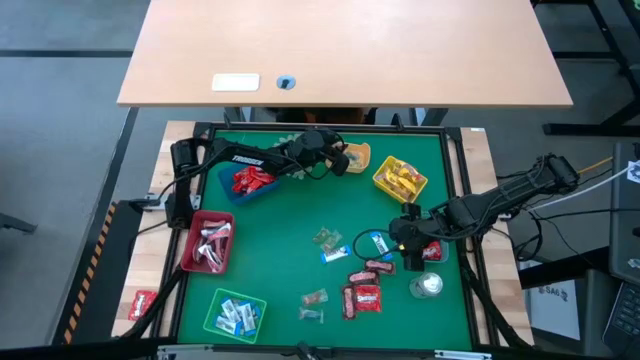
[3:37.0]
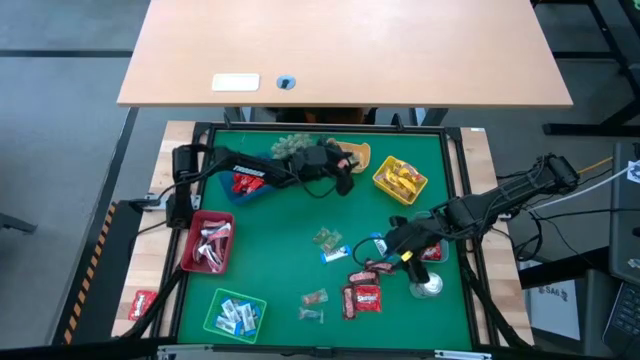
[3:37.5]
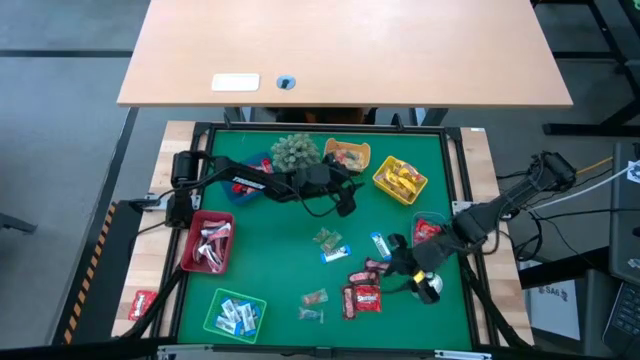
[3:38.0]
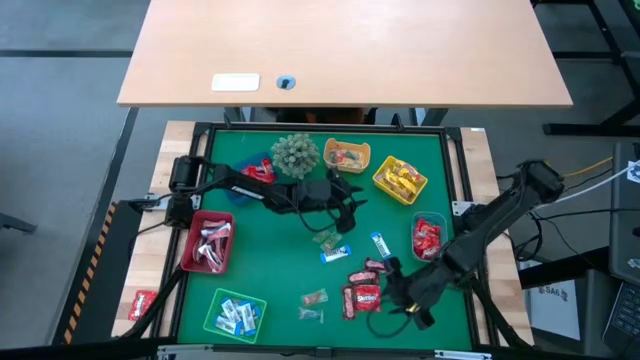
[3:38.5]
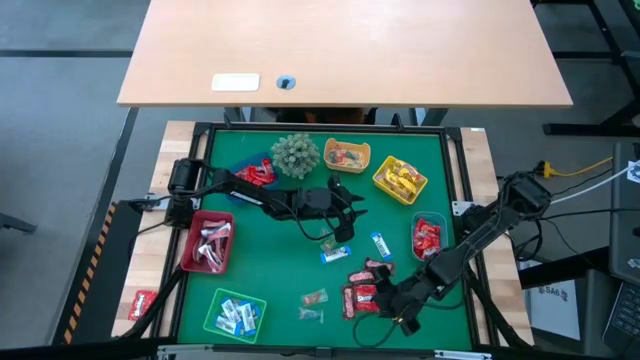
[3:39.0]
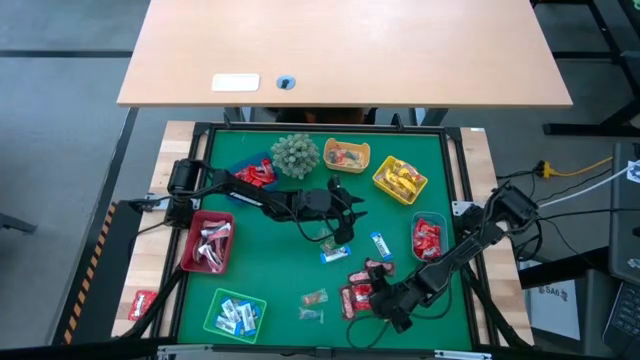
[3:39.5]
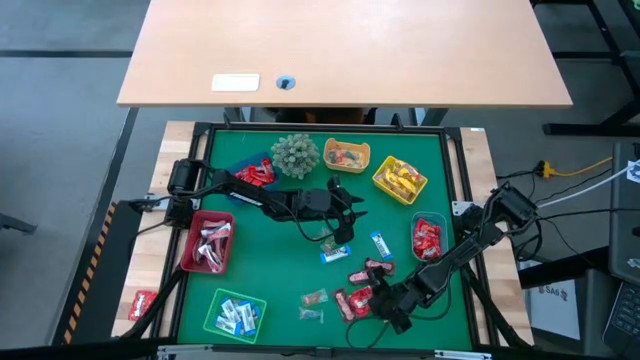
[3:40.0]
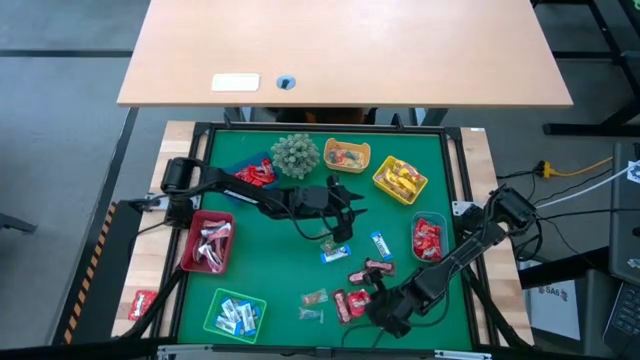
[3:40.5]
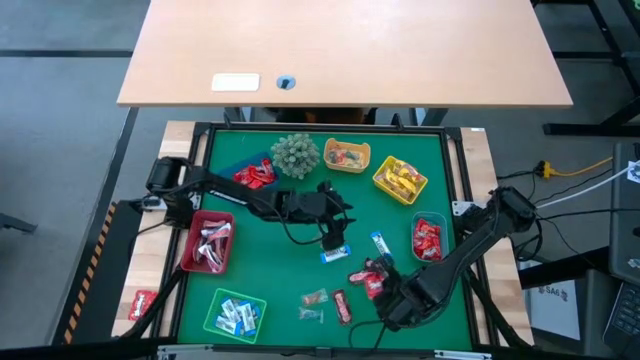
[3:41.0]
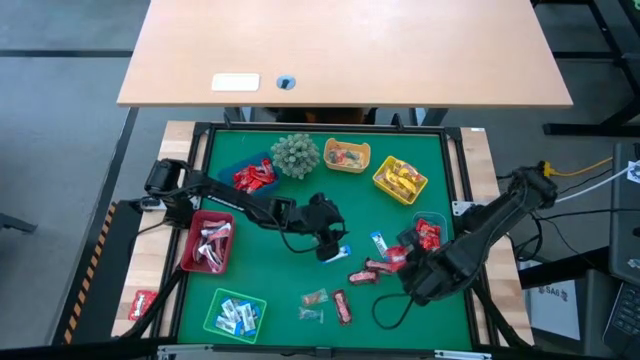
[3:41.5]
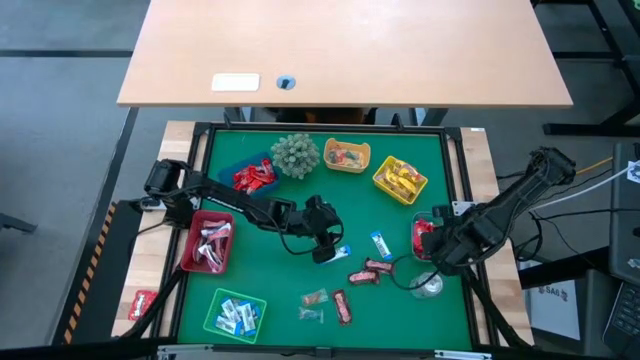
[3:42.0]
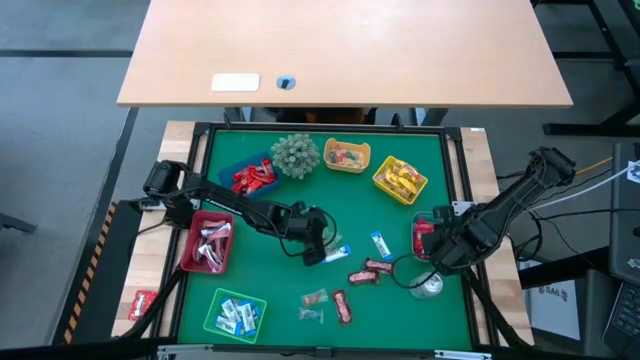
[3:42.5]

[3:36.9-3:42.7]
Task: Sort candy
Put the red candy into the gray bin

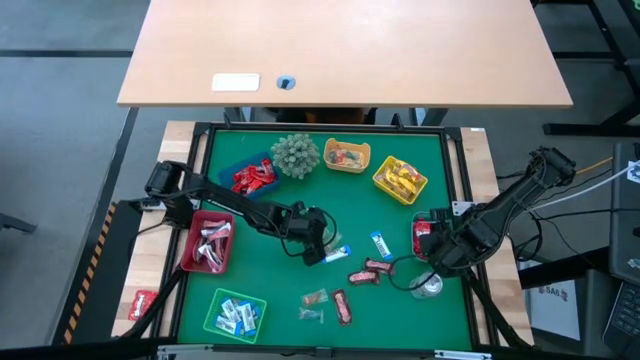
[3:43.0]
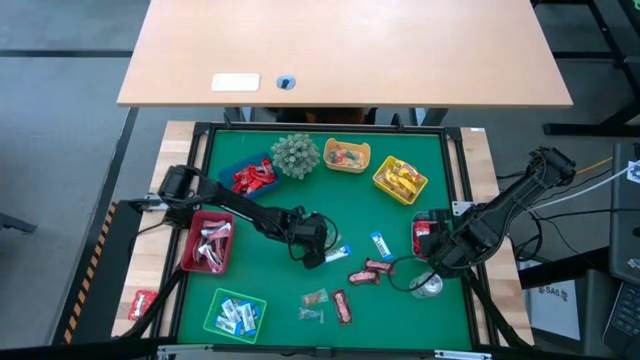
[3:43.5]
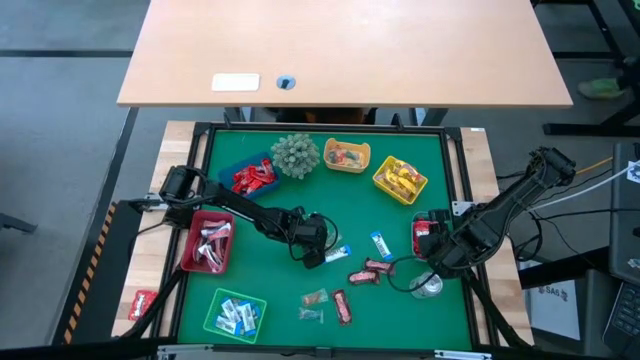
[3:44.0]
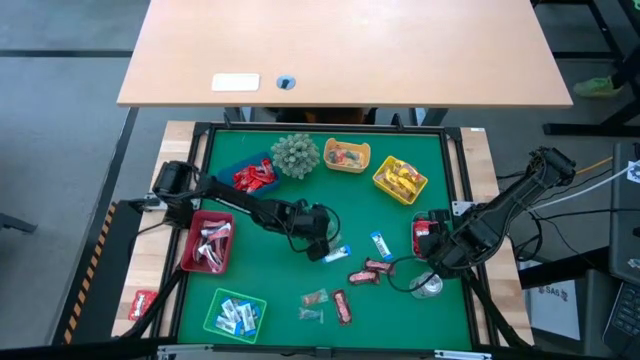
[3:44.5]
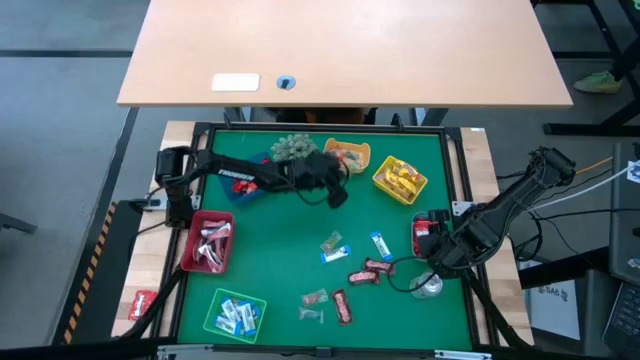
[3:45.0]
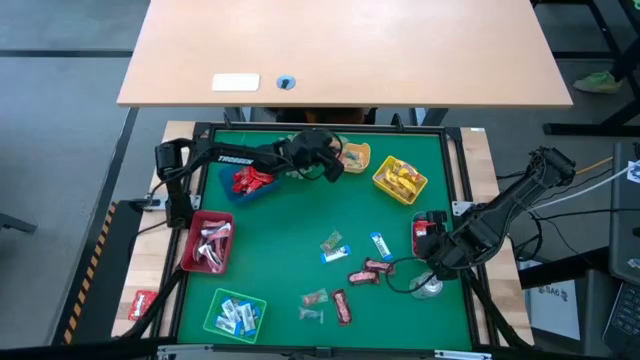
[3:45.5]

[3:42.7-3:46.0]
Put the green gummy into the orange bin

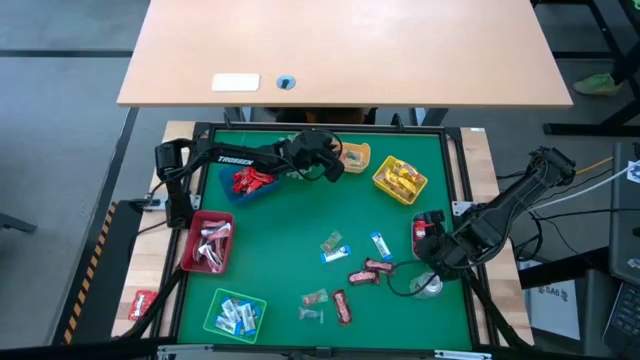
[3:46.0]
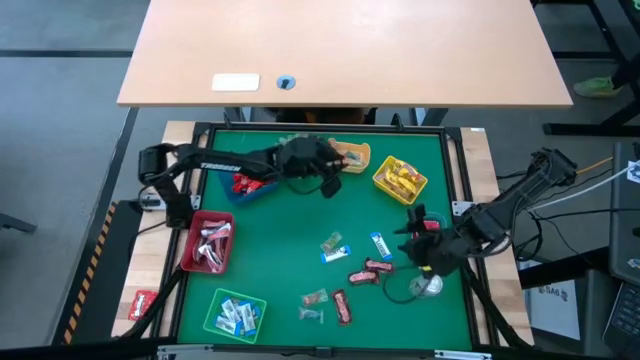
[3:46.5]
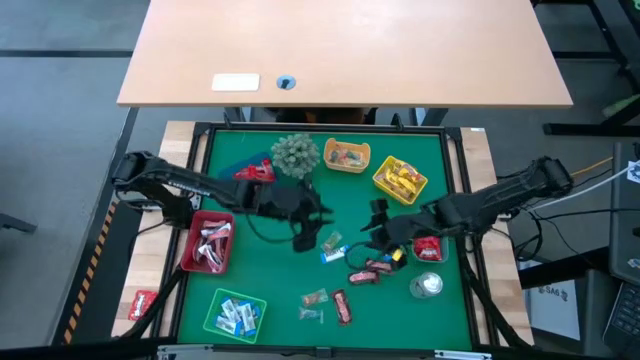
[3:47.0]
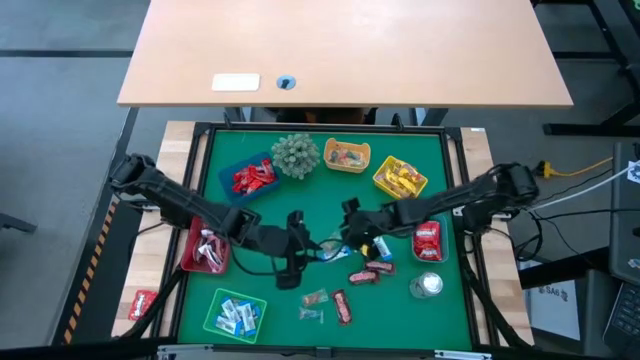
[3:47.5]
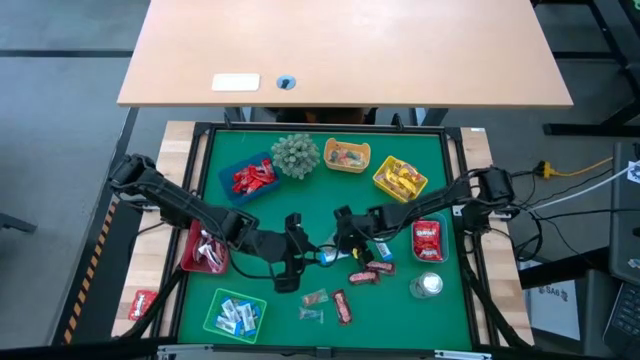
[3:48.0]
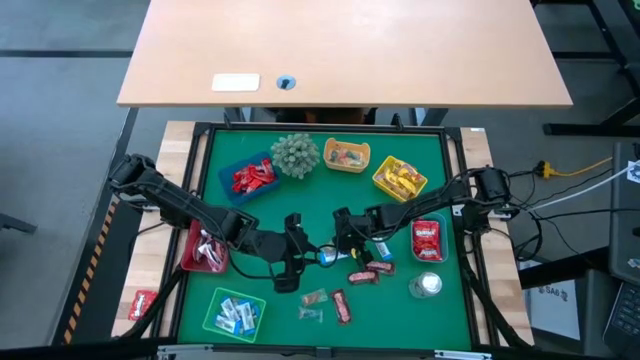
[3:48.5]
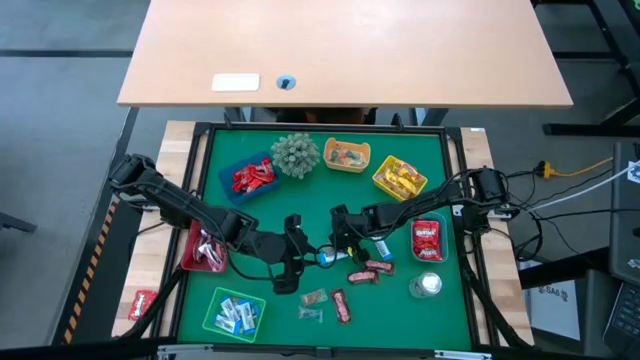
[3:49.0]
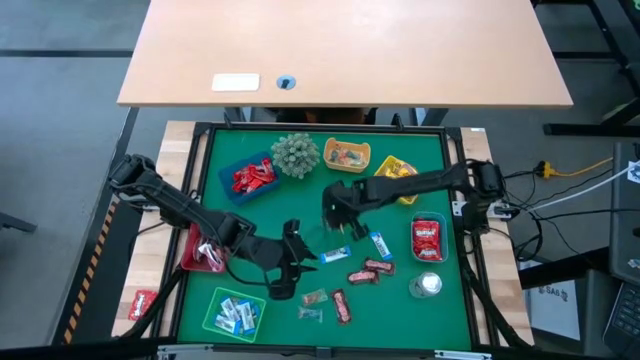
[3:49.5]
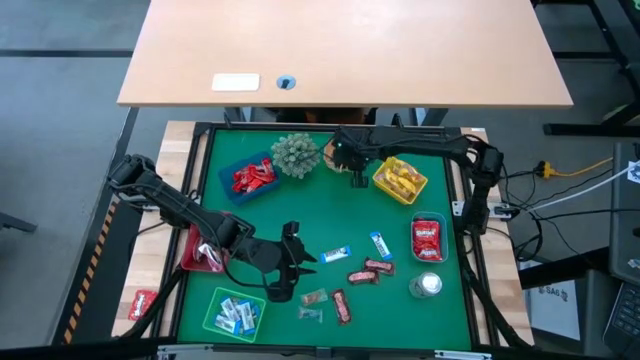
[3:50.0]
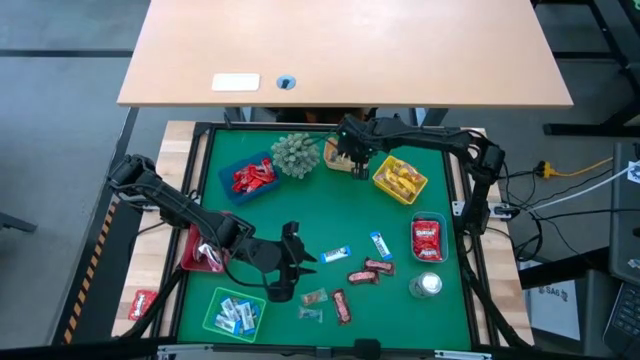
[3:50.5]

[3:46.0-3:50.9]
Put the green gummy into the orange bin

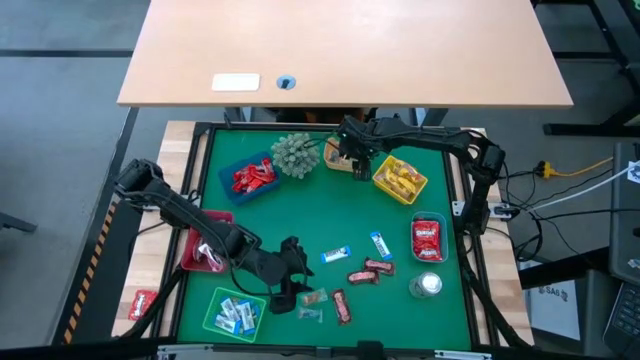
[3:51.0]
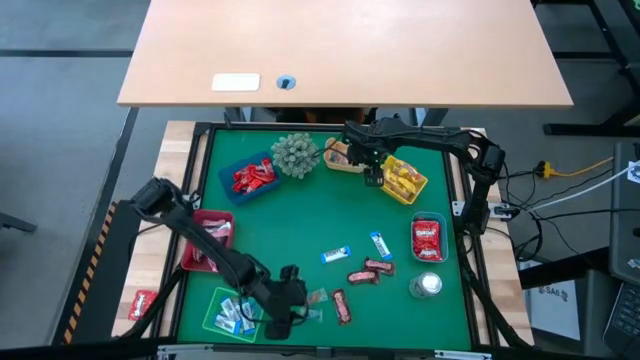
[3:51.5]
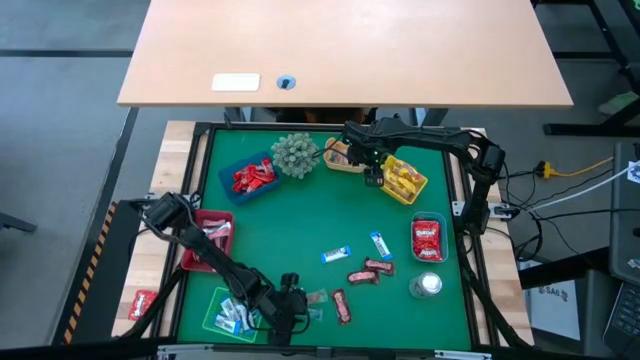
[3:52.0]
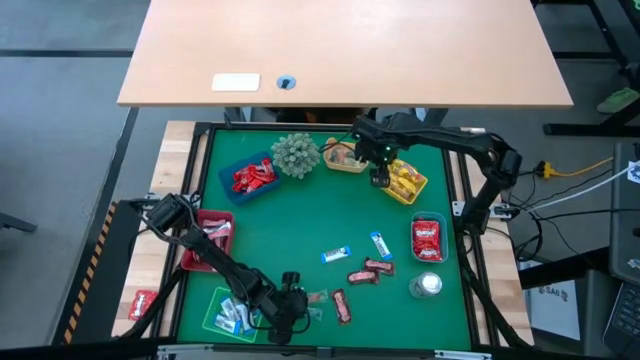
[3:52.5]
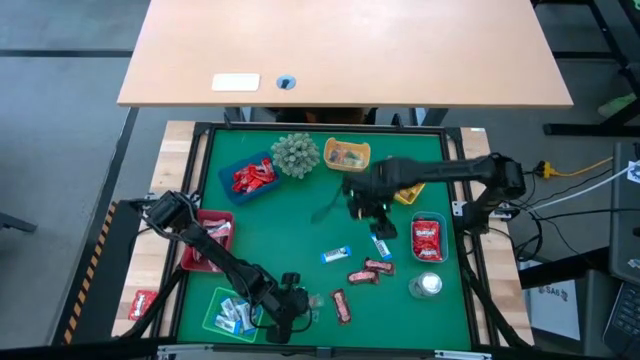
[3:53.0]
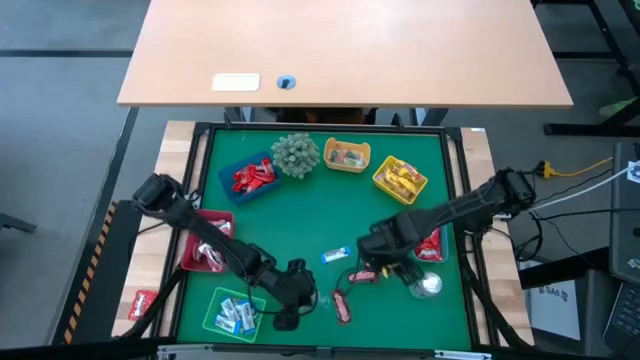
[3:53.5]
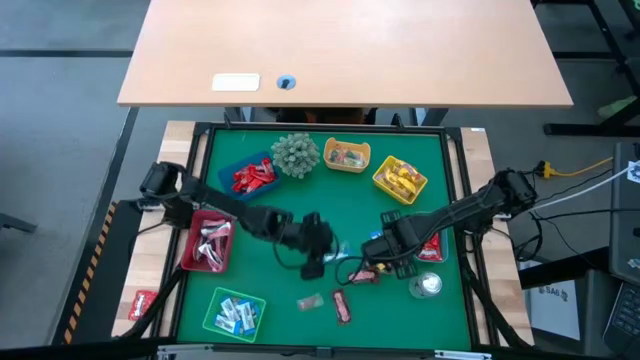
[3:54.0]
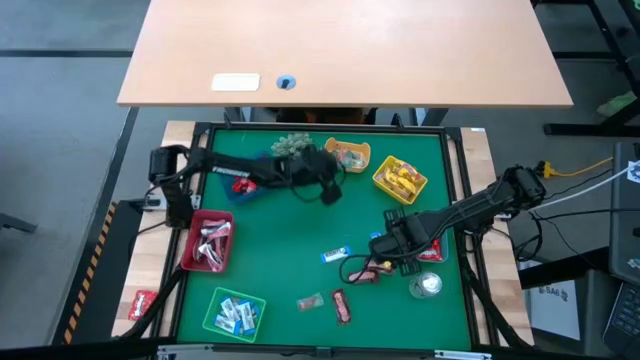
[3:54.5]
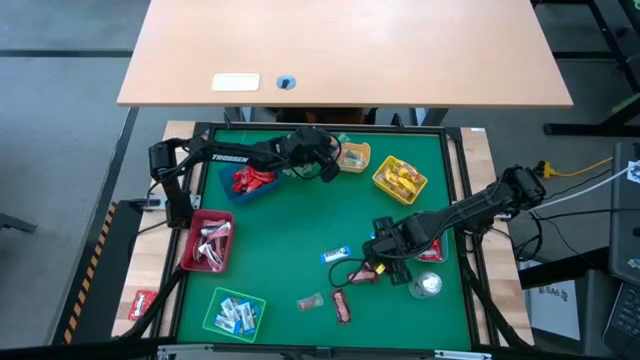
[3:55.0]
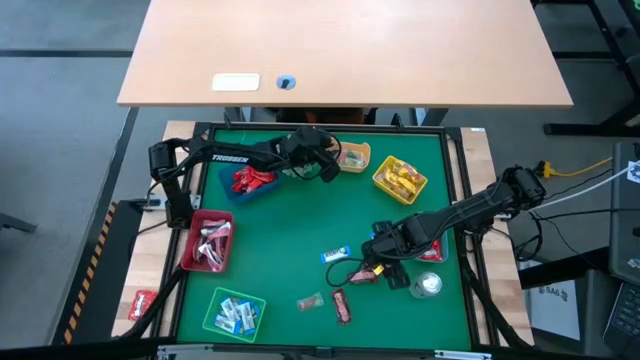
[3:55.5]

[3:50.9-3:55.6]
Put the blue gummy into the orange bin

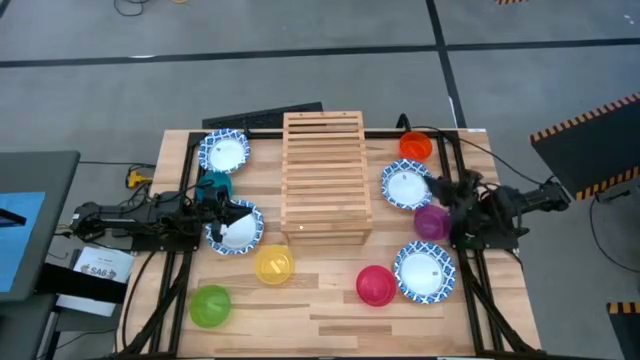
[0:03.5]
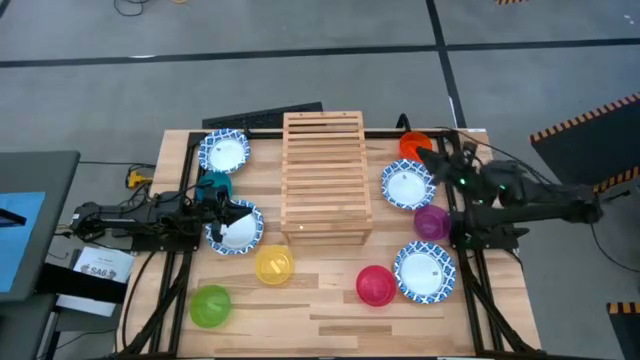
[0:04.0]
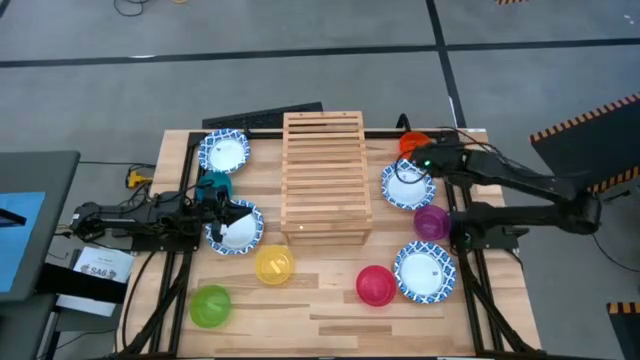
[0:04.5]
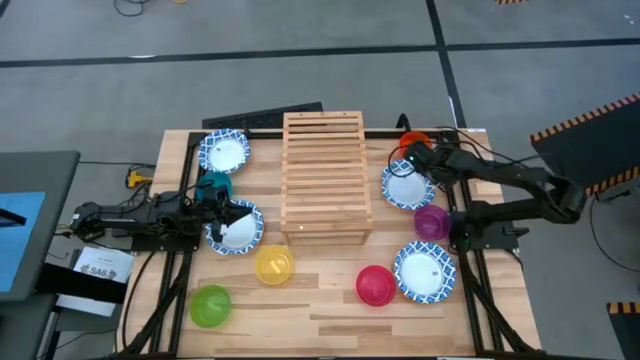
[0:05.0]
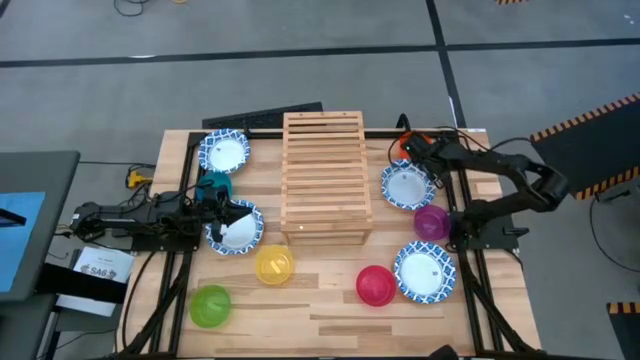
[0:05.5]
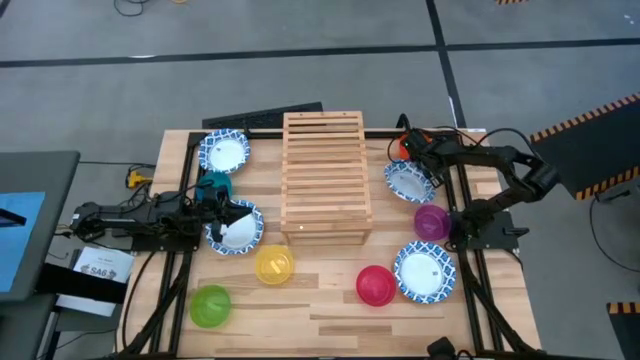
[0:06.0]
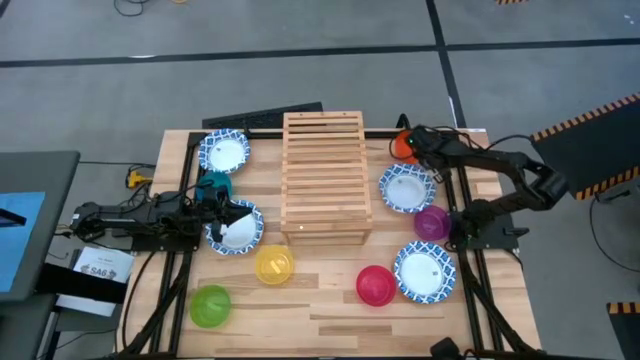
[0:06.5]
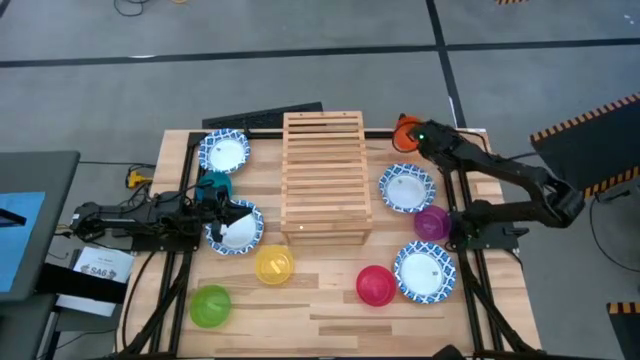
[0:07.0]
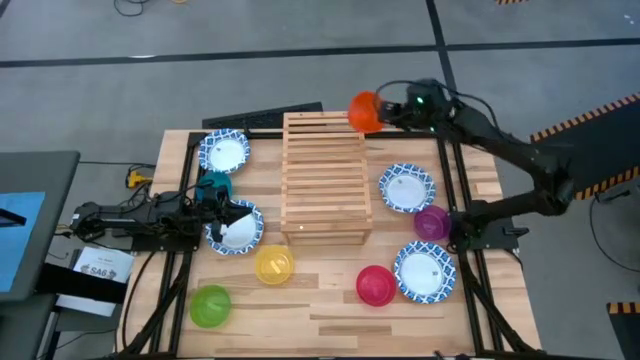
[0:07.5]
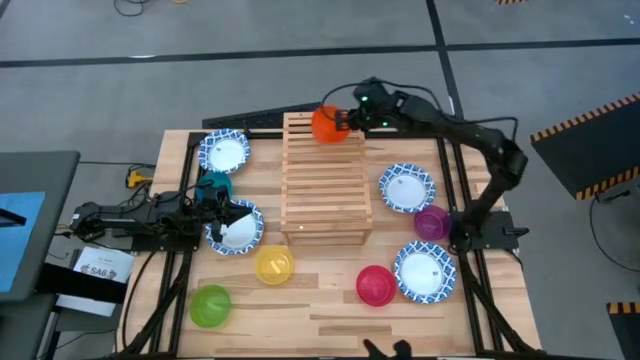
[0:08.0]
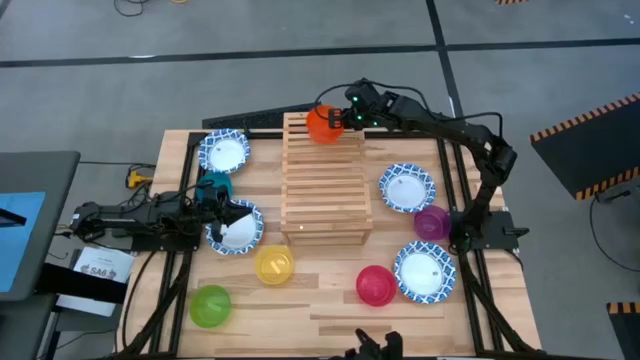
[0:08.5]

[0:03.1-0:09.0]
Task: Place and stack bowls onto a shelf
Put the orange bowl on the shelf
